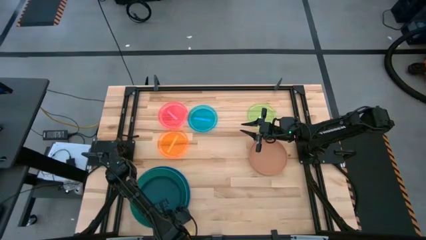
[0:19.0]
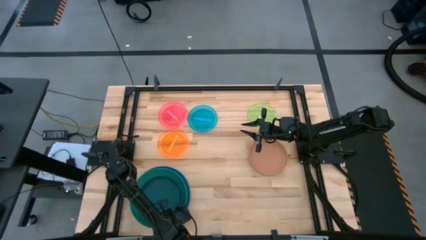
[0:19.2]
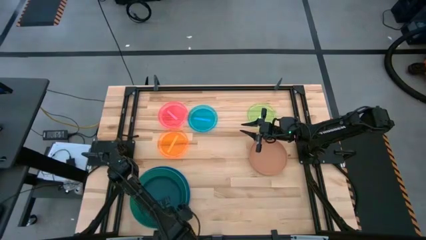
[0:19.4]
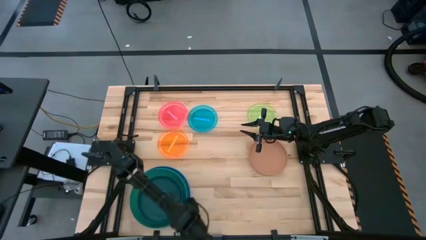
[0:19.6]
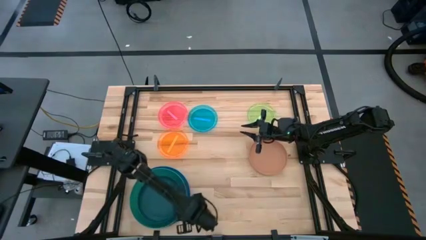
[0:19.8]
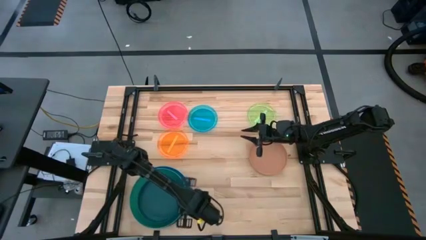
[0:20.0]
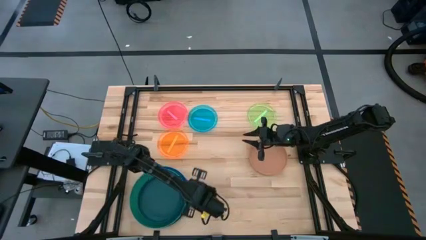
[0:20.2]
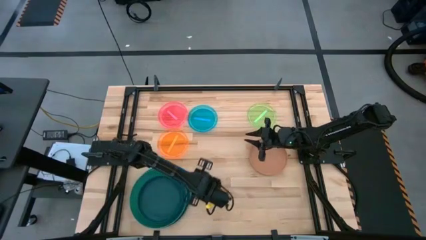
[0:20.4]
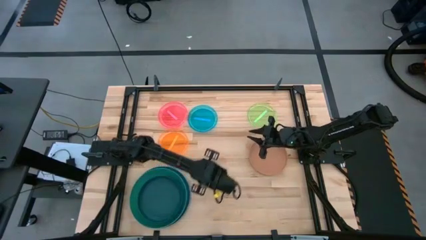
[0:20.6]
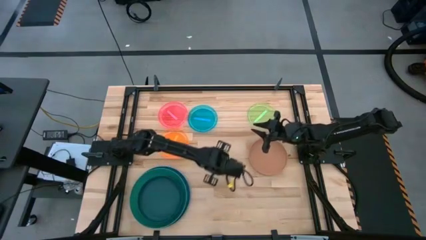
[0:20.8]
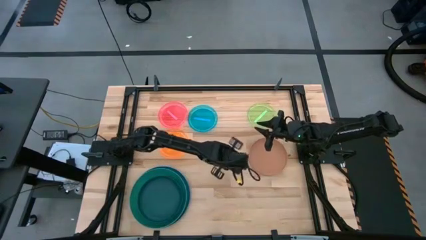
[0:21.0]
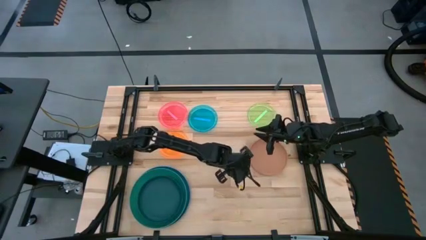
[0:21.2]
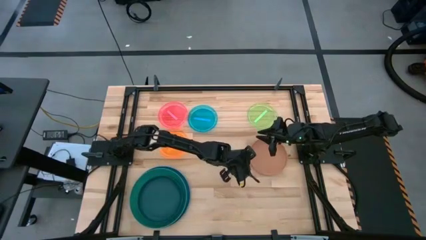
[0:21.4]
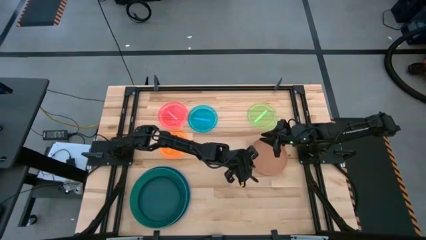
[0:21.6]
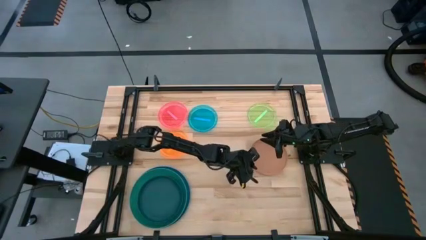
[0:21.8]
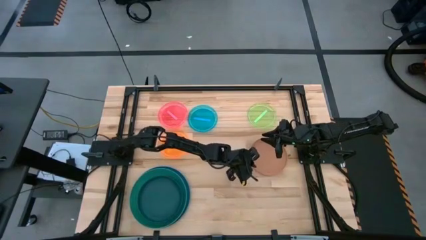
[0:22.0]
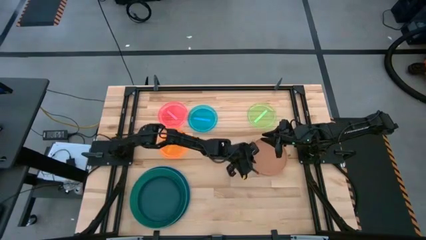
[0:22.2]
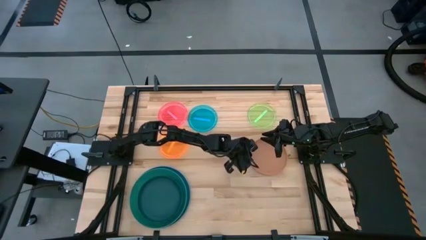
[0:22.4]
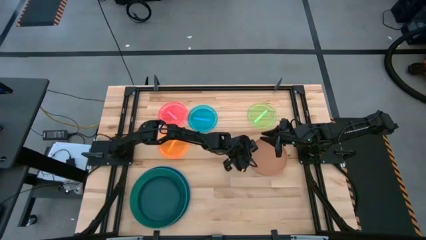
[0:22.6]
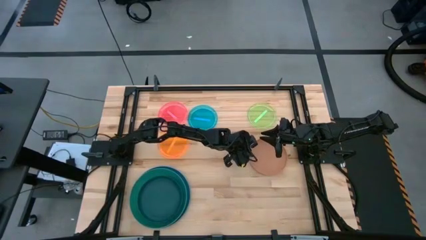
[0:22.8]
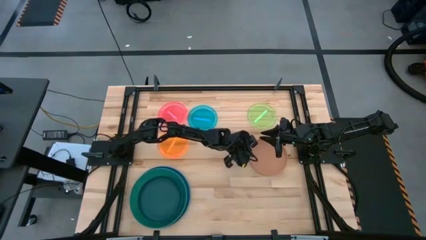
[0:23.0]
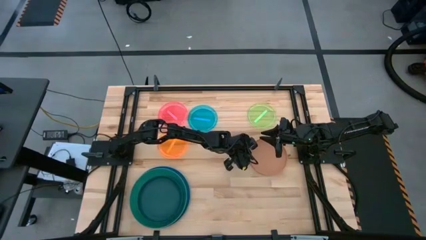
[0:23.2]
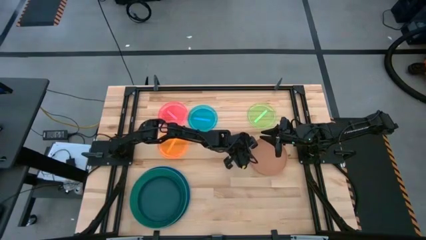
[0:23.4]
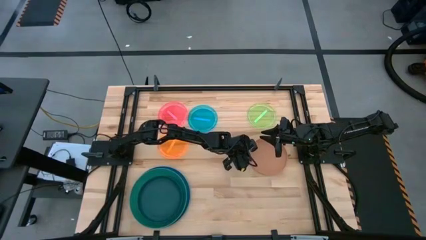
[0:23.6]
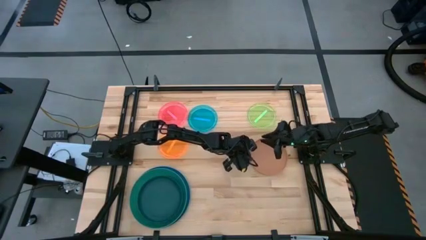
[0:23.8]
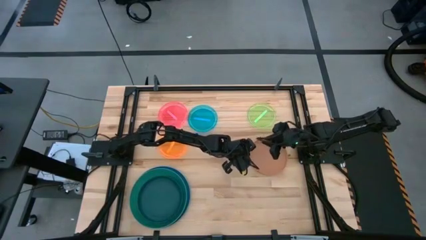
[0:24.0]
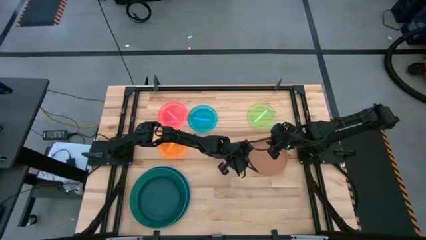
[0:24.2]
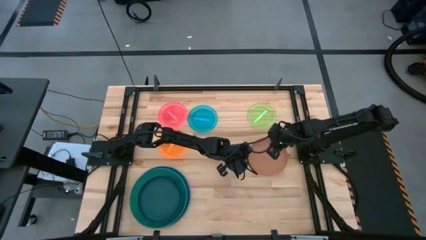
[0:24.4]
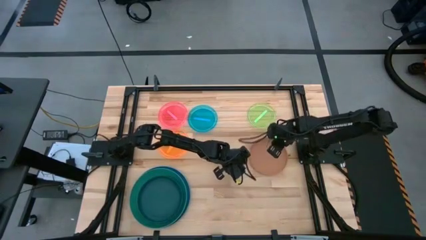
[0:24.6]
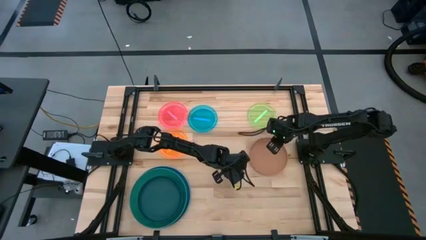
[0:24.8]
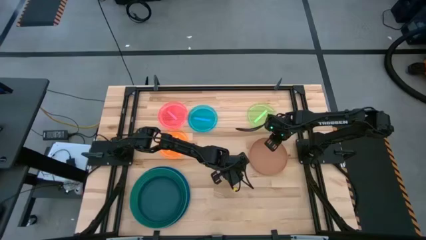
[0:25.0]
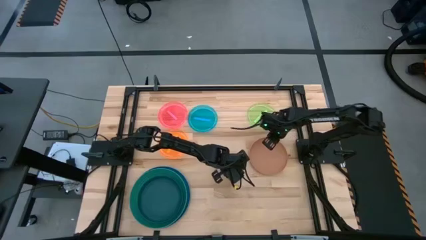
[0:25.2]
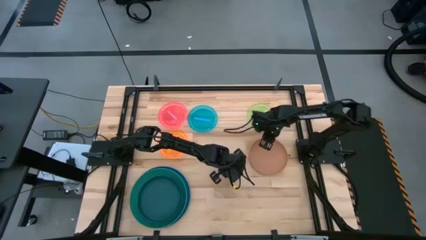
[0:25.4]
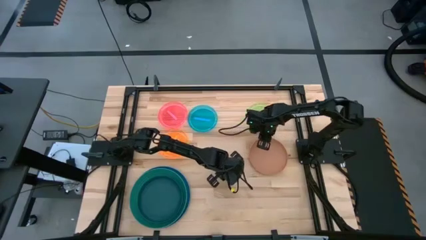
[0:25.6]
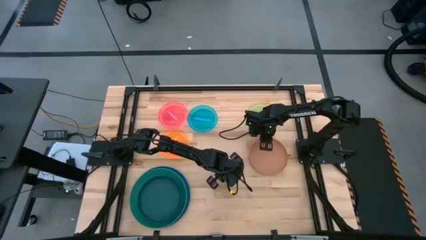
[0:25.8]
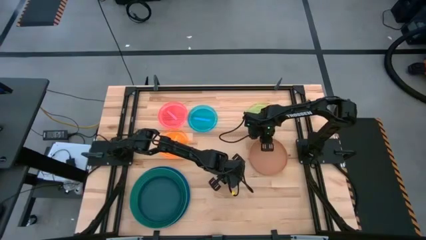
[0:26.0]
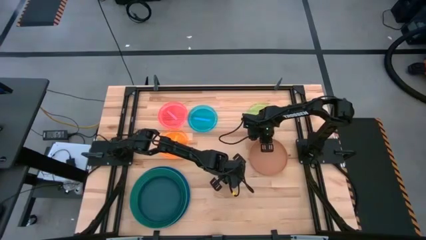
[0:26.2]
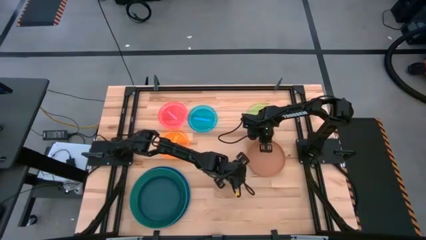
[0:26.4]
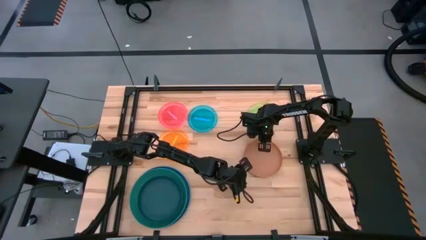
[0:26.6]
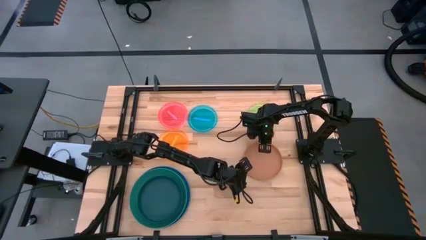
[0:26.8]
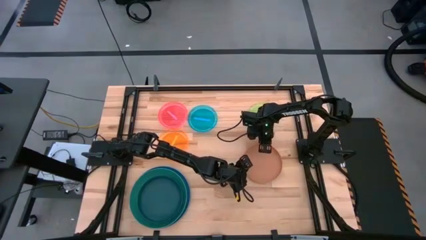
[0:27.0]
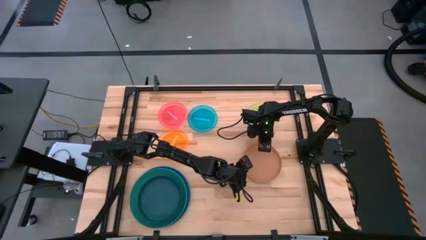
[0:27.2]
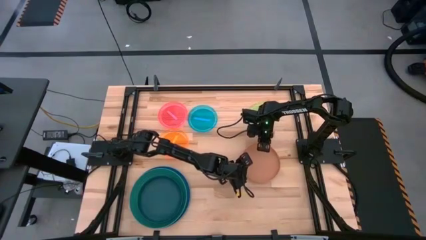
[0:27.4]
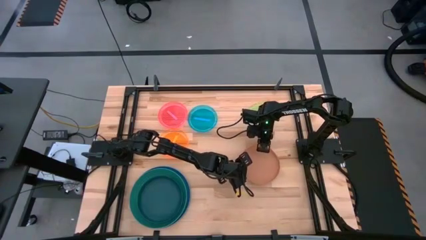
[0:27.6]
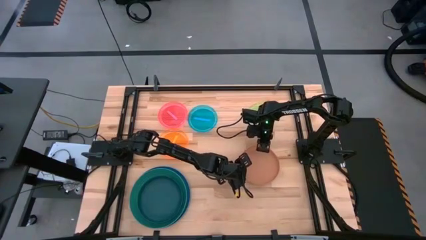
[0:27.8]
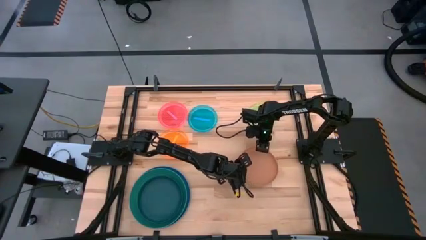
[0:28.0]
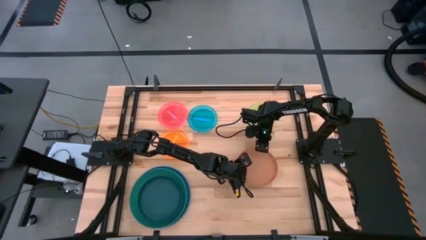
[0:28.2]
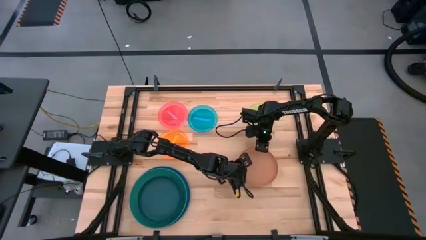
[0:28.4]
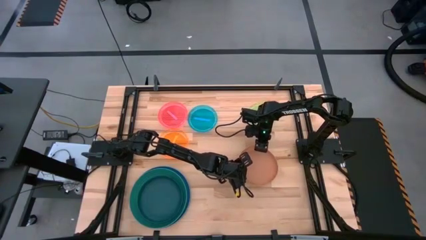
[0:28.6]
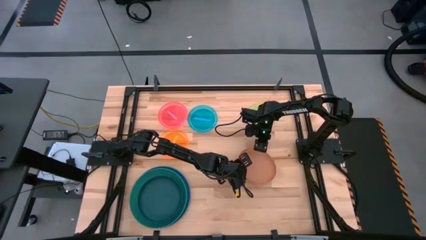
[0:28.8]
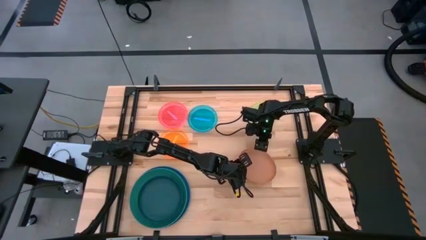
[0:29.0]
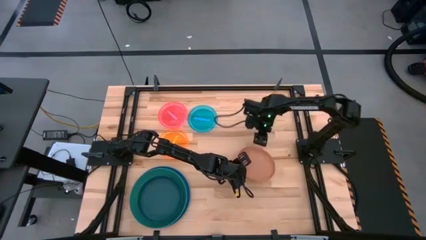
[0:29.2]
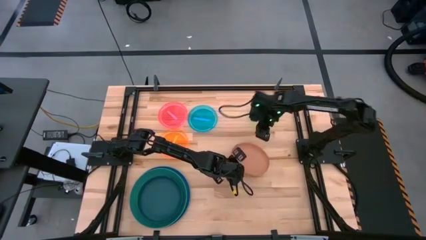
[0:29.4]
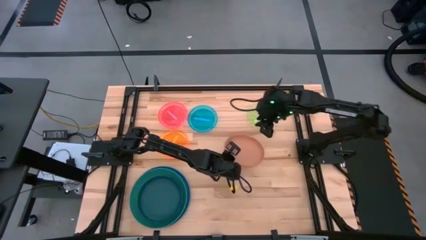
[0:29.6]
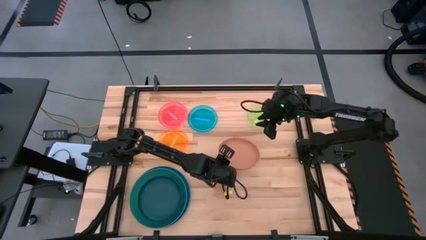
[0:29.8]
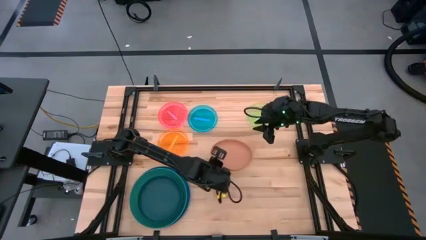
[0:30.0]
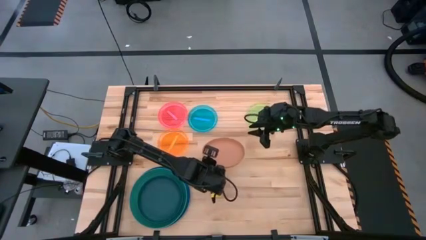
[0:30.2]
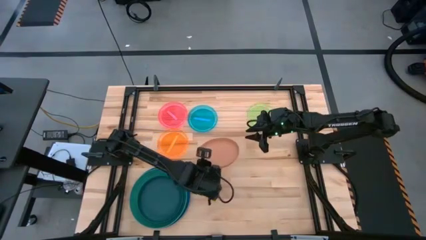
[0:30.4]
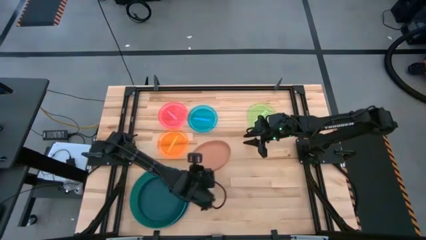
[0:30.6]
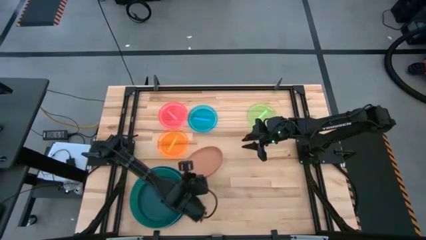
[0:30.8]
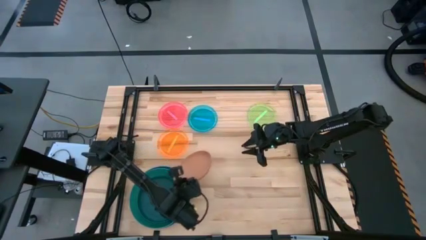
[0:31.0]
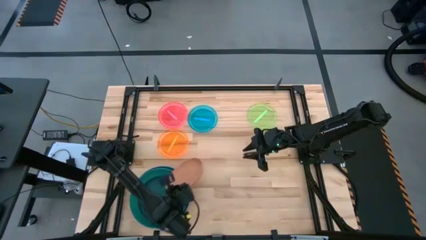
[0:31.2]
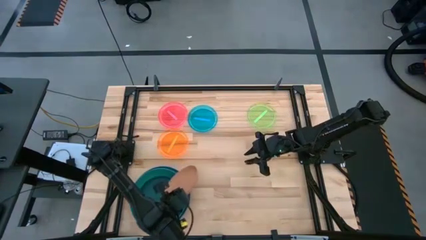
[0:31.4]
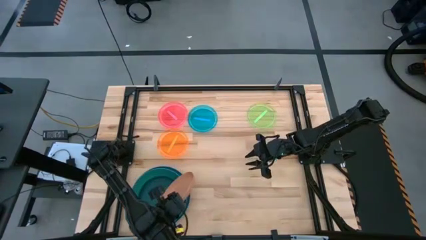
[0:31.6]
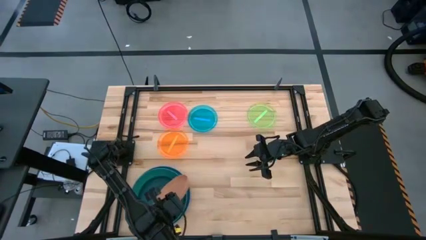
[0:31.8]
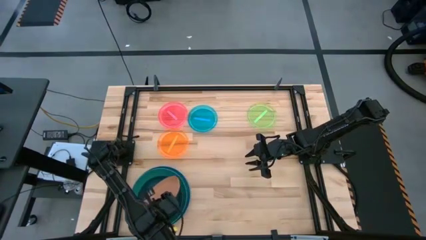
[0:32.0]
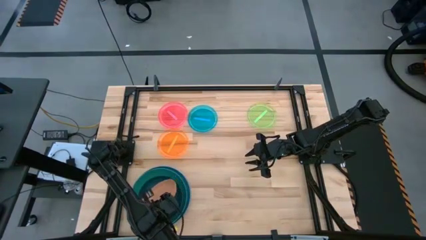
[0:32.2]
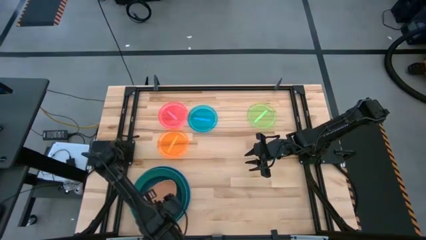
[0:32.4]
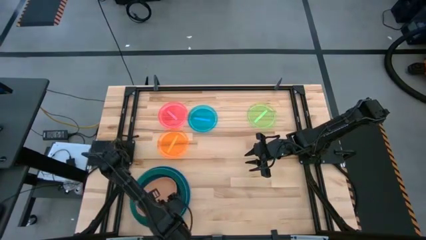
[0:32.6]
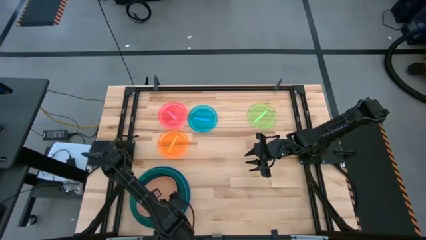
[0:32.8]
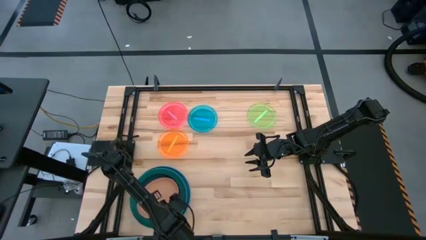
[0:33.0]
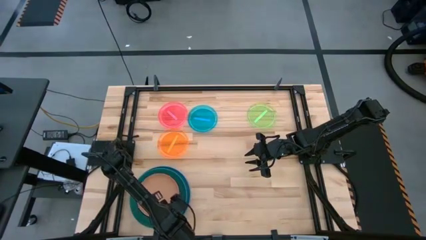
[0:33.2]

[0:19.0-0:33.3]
Task: Stack plastic plates
Stack the light orange plate on top of the dark green plate

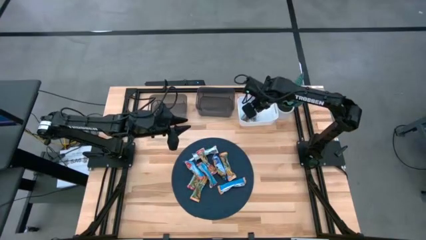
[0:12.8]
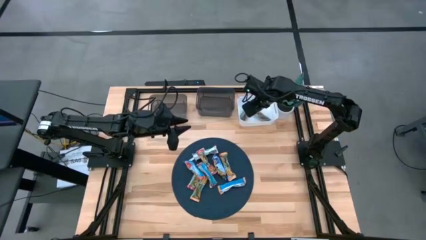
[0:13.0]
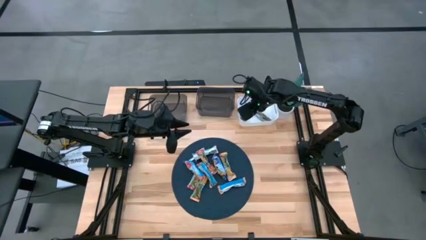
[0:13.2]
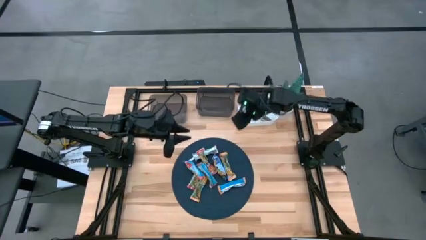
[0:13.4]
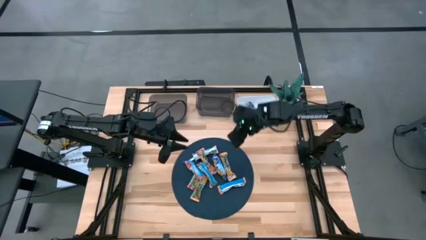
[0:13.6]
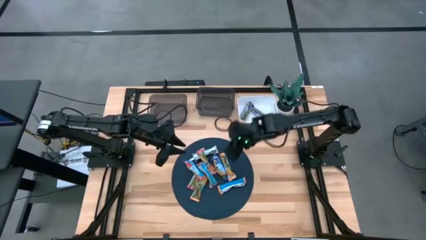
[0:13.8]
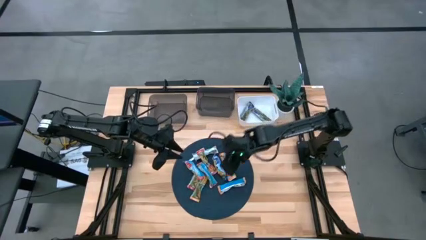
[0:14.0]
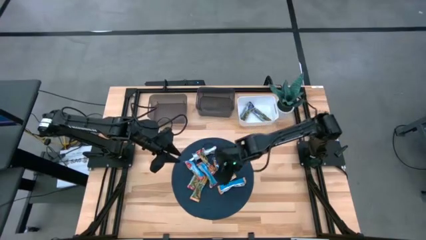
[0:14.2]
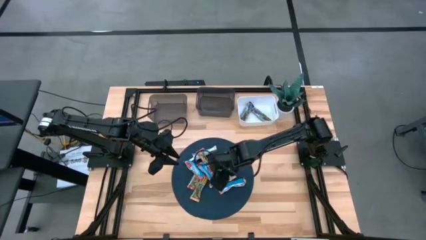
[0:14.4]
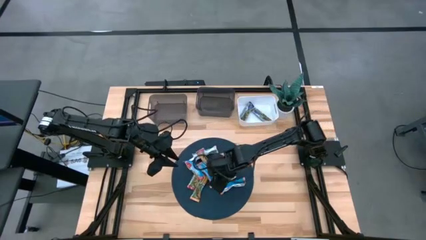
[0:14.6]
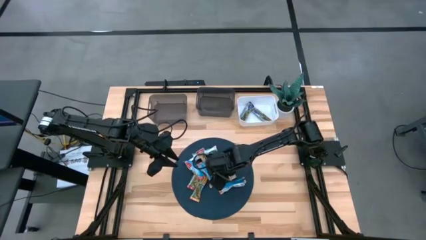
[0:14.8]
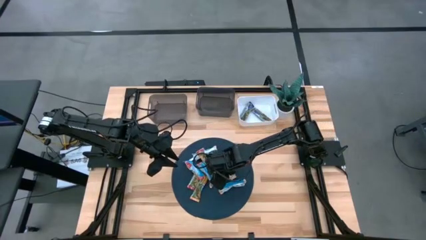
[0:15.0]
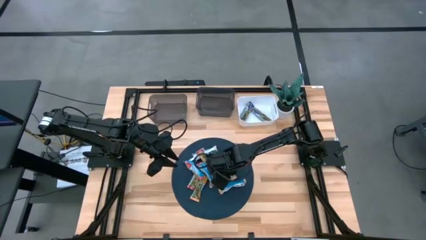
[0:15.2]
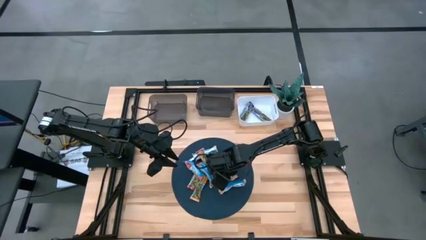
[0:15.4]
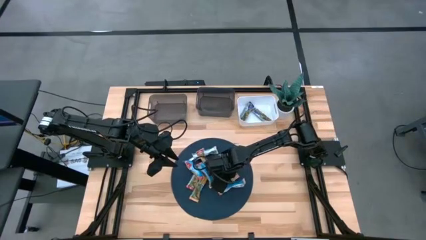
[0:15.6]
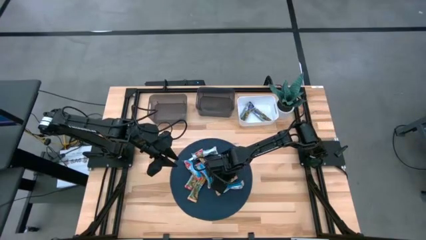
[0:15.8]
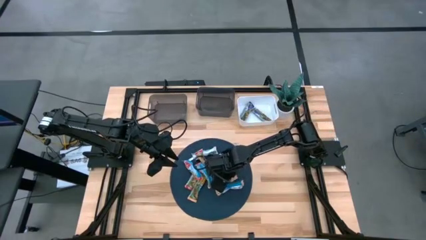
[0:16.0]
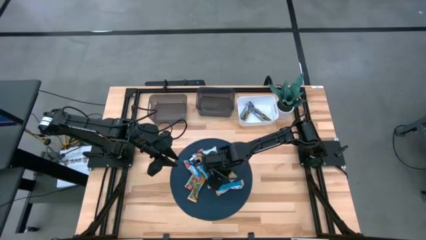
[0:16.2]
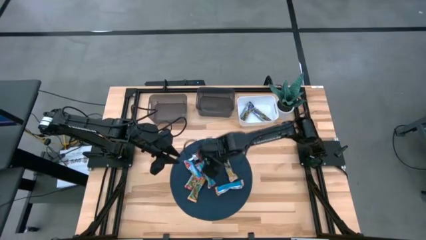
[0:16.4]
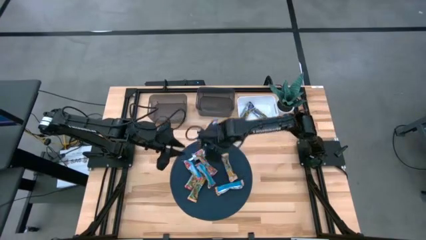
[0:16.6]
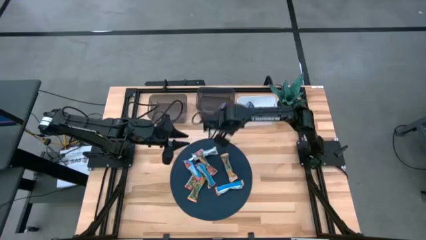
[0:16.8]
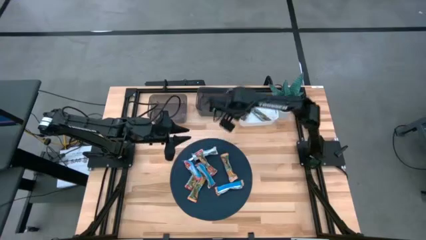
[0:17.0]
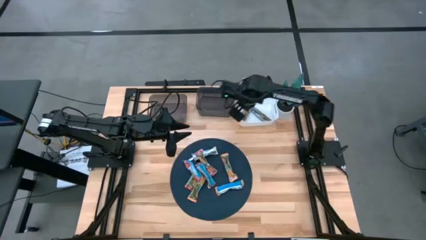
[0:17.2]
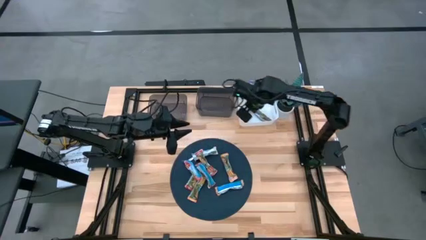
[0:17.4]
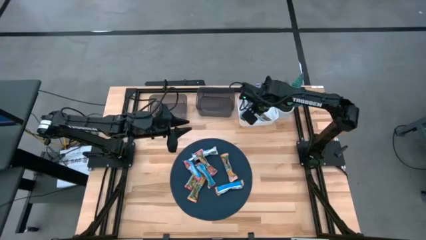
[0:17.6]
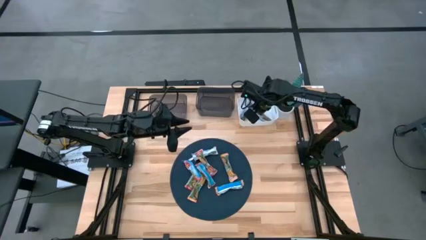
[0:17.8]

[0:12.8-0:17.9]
Task: Pick and place Granola Bars by type
Put the blue granola bar into the white bin
